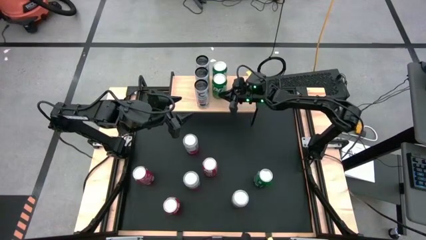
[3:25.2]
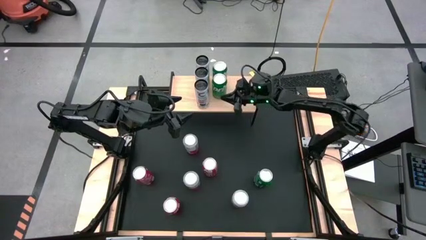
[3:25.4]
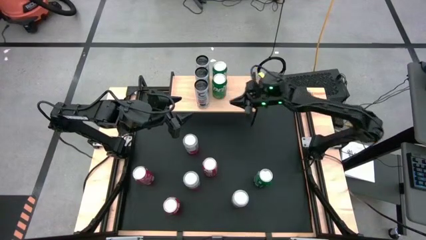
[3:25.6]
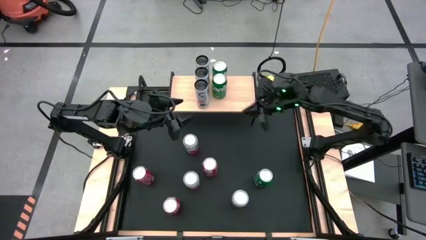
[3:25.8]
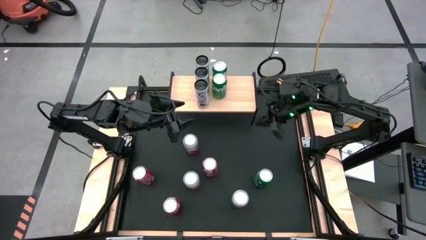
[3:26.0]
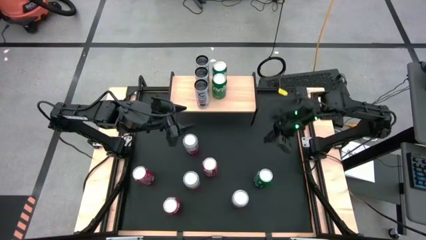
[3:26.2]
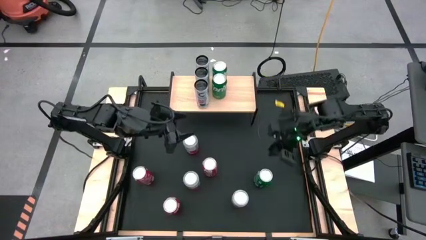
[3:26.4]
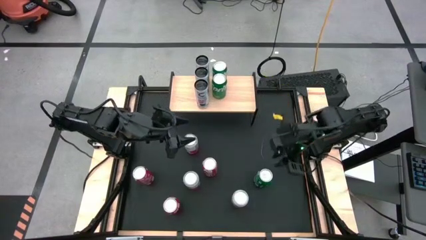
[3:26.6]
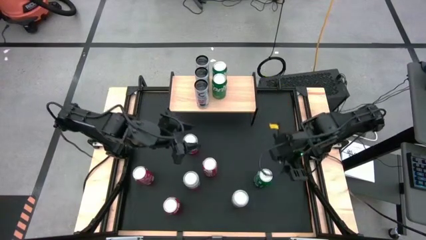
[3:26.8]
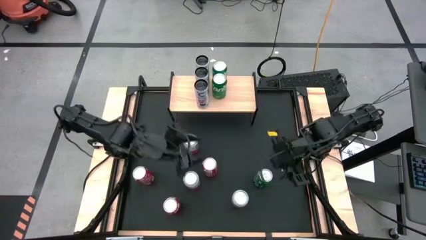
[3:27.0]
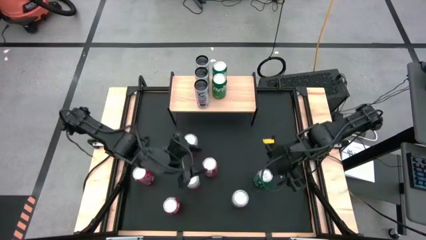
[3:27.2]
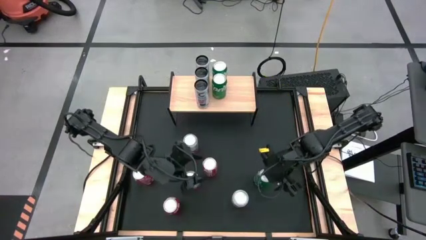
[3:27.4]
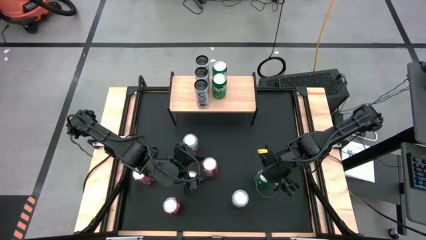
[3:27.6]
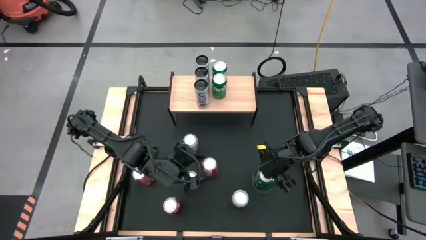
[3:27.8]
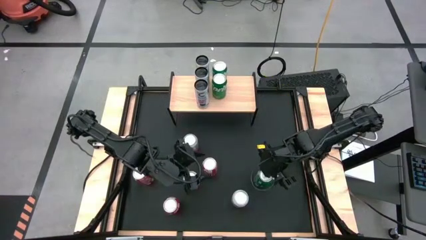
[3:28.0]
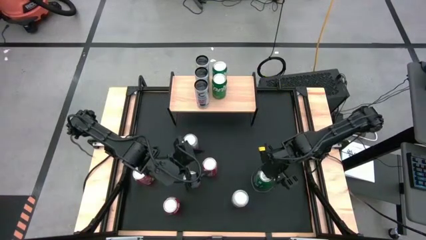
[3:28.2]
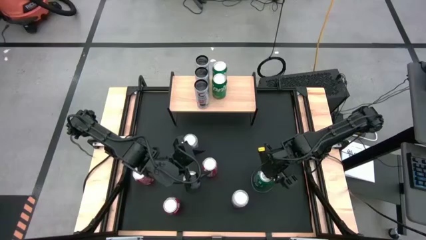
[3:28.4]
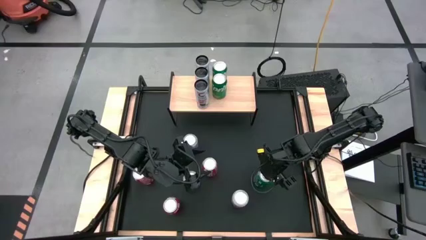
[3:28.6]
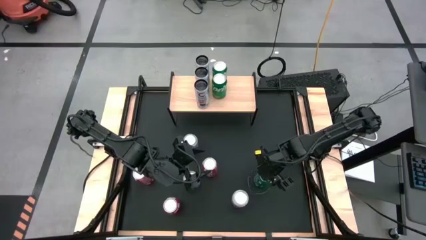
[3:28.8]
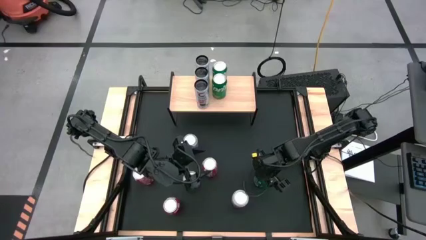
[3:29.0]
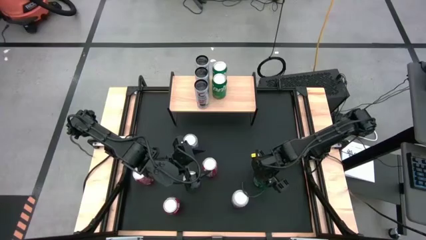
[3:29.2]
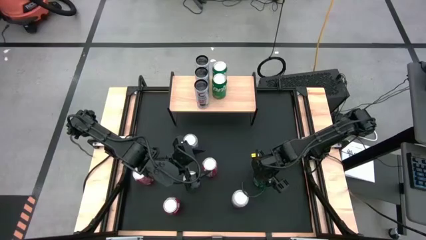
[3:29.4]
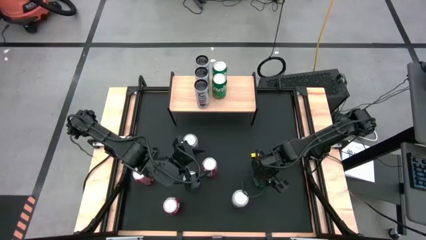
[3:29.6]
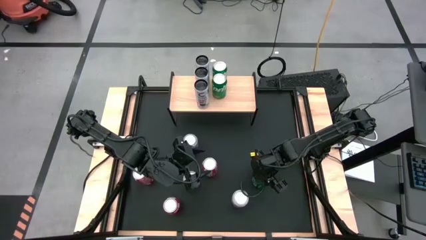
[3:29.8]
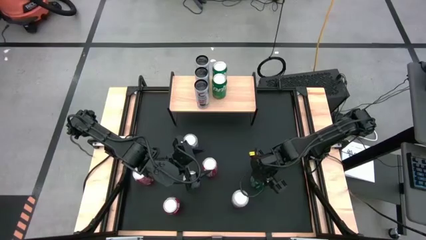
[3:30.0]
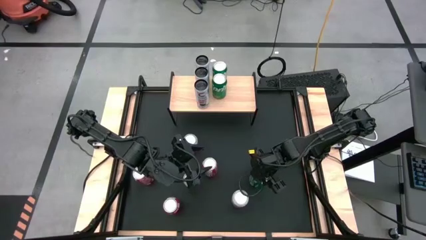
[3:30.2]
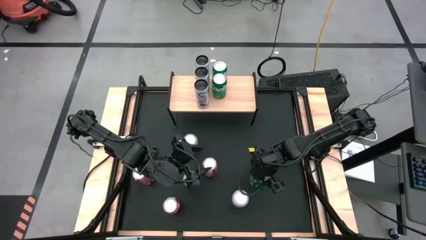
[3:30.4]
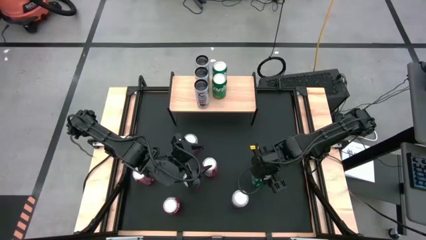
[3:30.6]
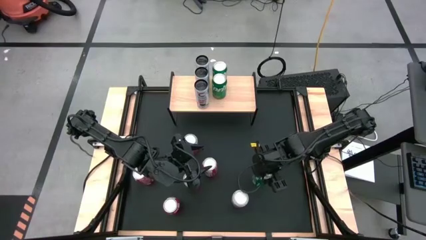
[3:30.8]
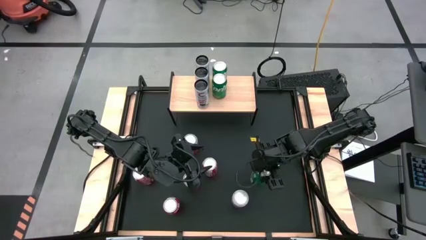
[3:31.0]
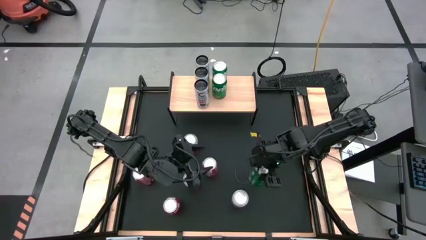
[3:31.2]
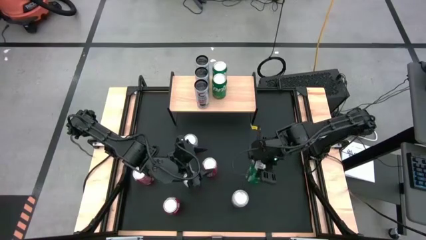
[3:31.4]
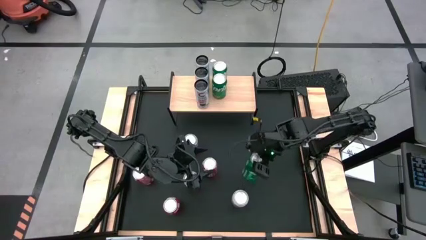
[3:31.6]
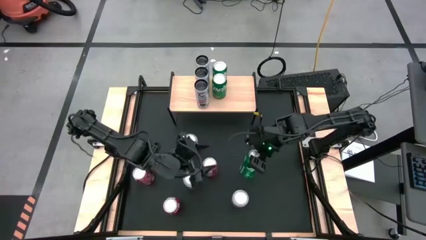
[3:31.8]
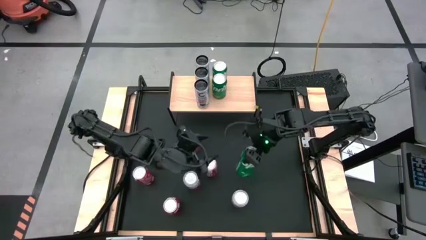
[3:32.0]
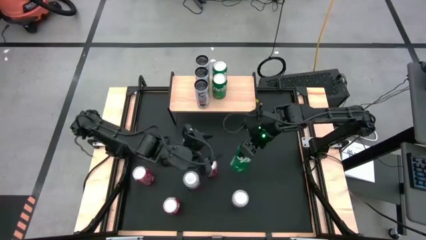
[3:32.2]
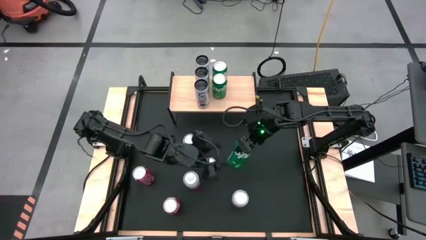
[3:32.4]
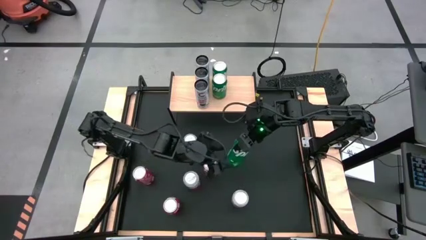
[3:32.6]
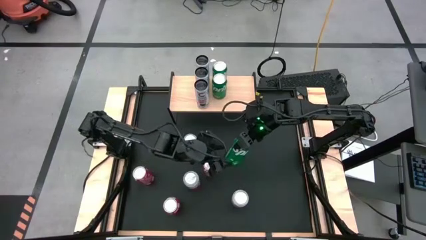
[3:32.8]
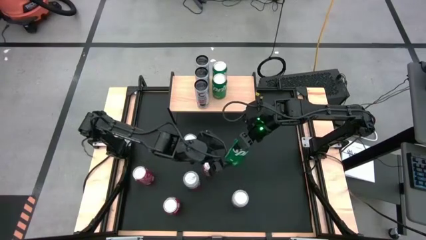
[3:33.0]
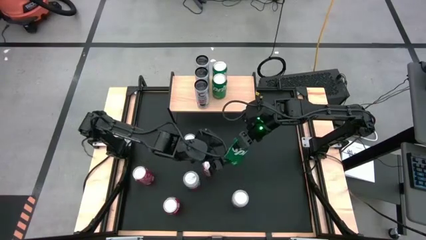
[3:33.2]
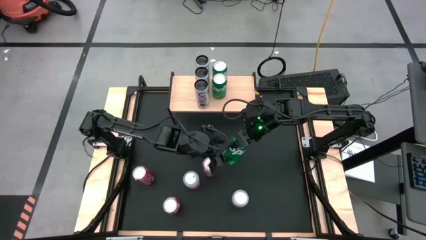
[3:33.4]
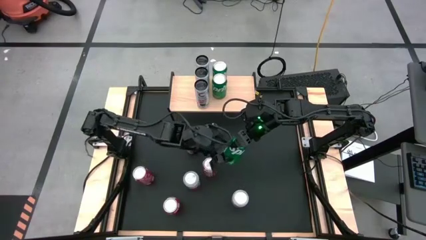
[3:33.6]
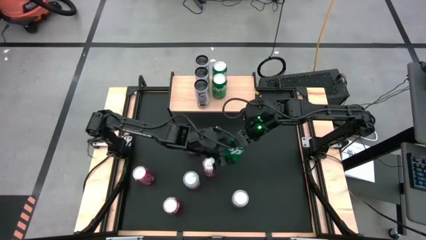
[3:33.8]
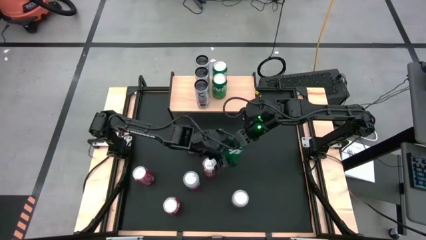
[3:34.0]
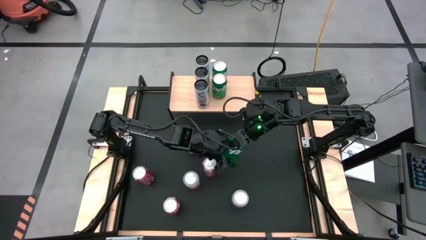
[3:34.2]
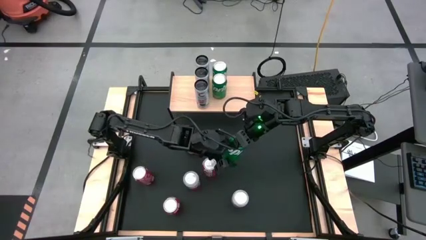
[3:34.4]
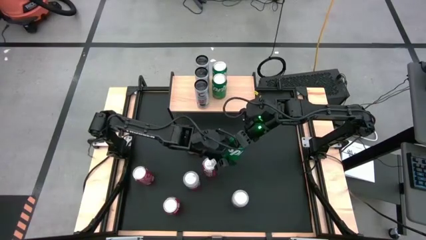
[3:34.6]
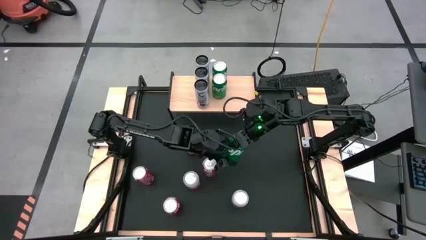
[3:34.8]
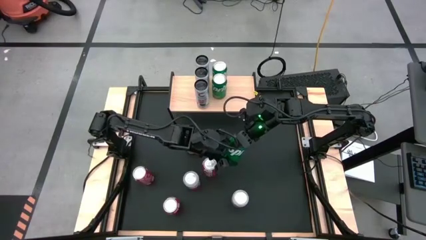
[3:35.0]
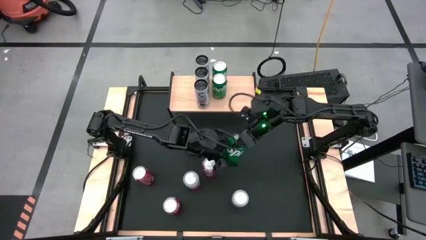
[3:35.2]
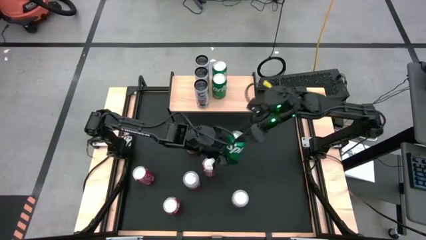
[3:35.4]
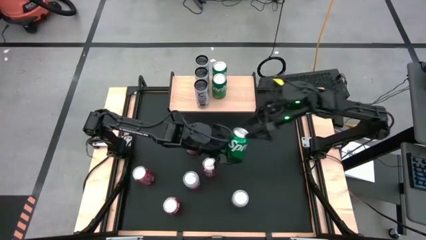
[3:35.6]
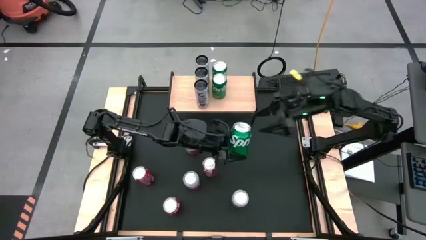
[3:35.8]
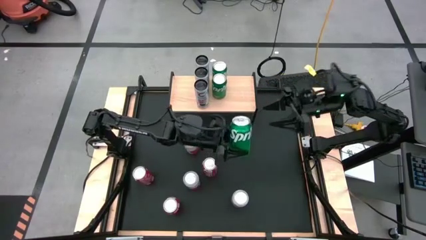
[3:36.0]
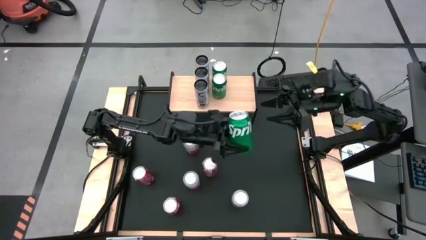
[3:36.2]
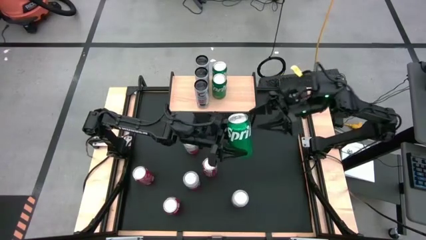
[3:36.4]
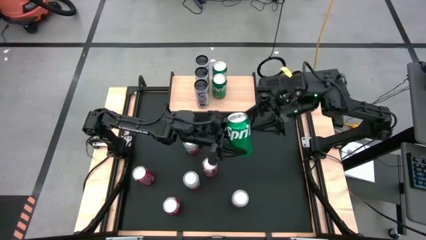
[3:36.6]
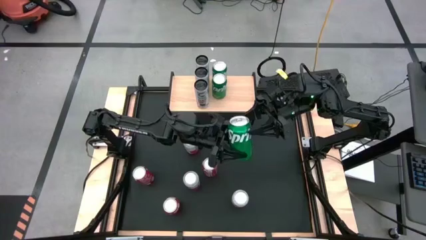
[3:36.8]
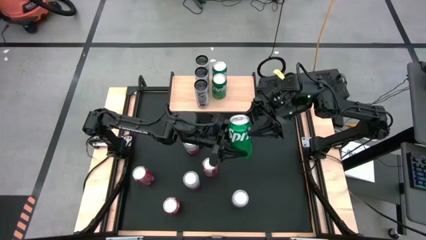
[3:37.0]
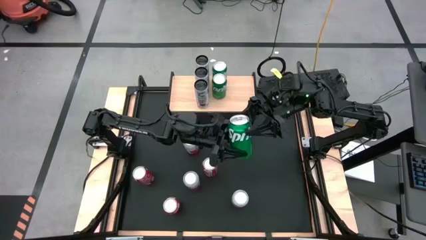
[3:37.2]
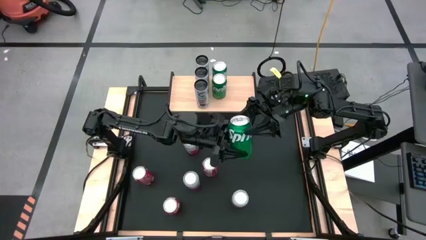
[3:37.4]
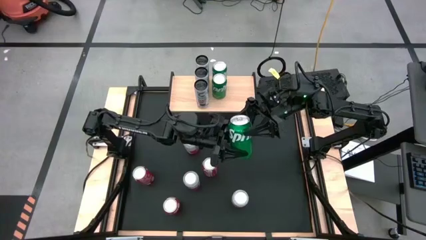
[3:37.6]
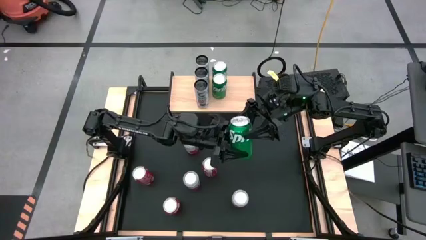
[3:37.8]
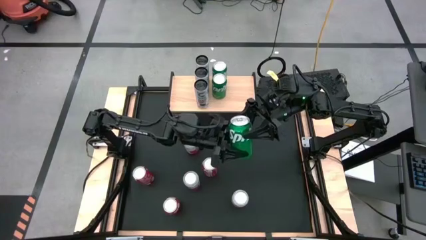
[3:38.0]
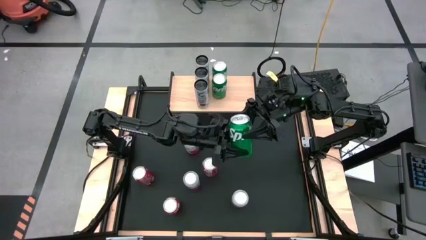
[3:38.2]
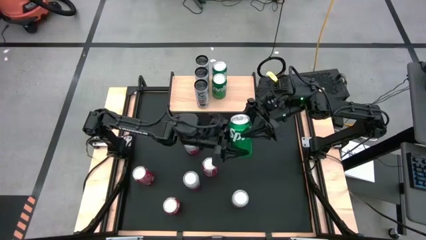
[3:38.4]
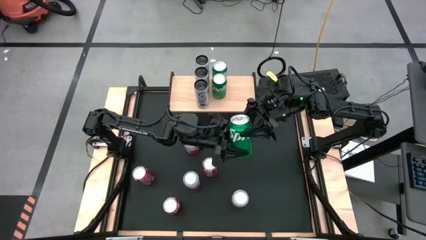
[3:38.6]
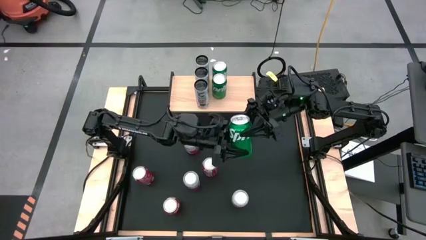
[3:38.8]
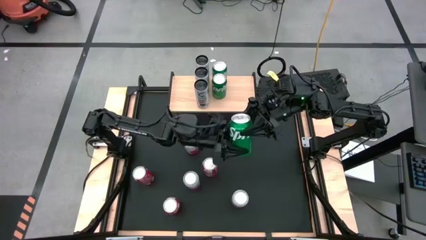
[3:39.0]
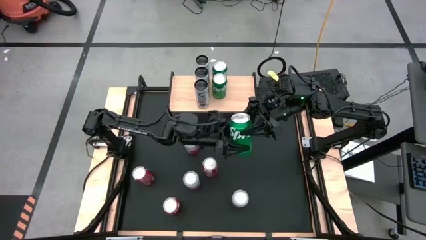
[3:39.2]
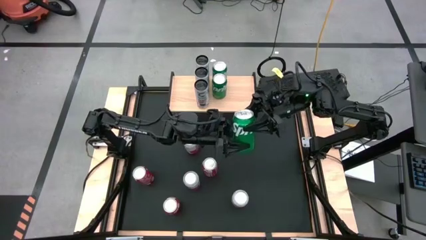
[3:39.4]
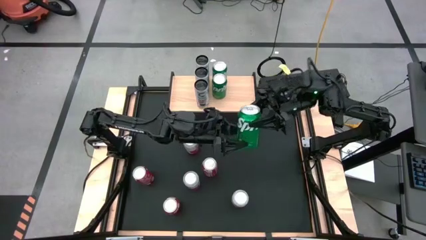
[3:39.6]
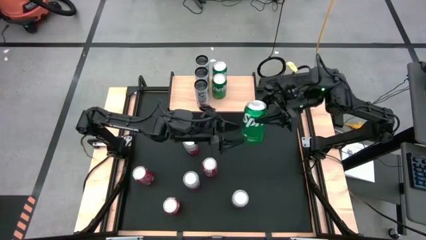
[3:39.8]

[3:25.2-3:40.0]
Task: Place canned beverage on shelf
Put the green soda can aligned with the other green soda can on the shelf
